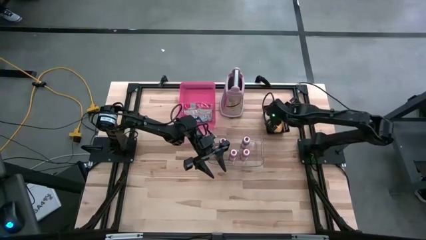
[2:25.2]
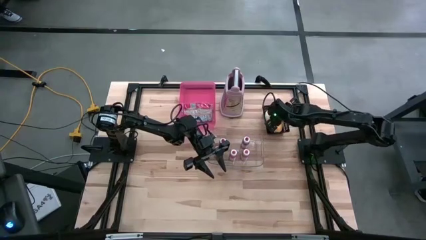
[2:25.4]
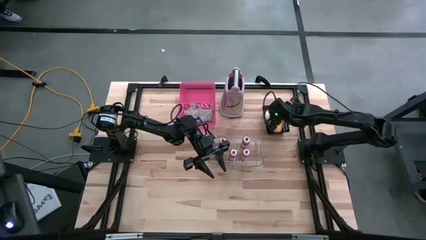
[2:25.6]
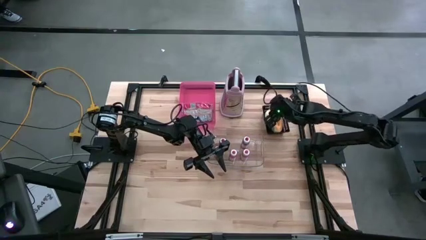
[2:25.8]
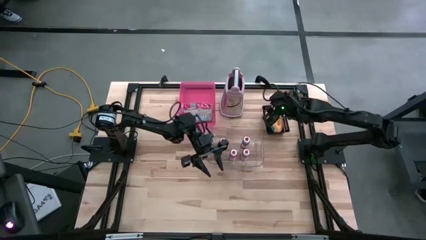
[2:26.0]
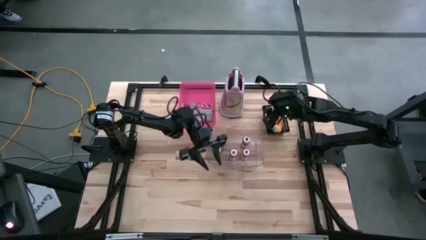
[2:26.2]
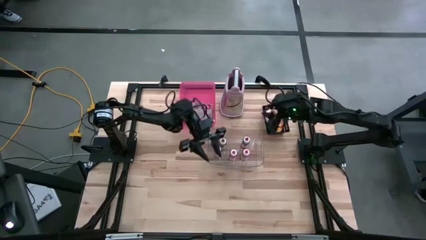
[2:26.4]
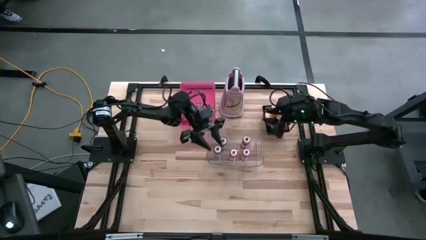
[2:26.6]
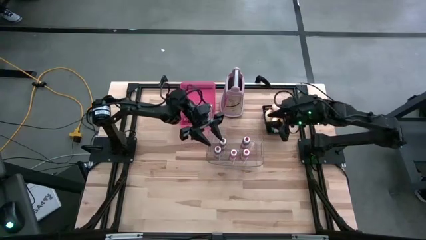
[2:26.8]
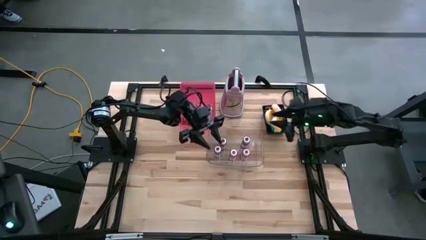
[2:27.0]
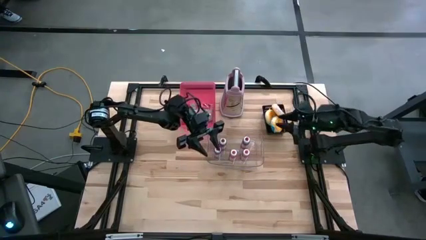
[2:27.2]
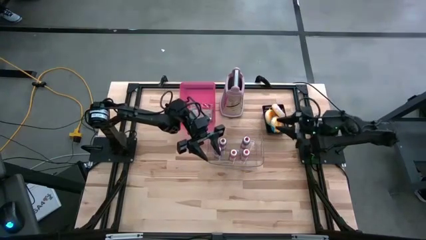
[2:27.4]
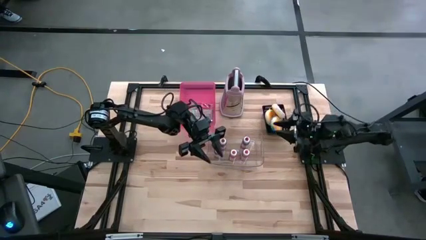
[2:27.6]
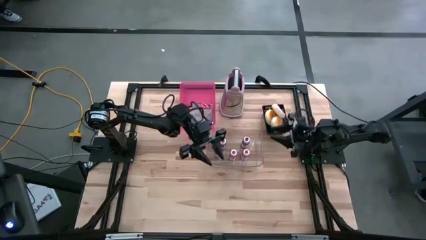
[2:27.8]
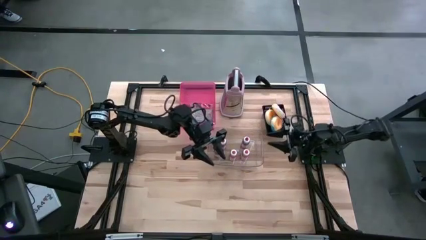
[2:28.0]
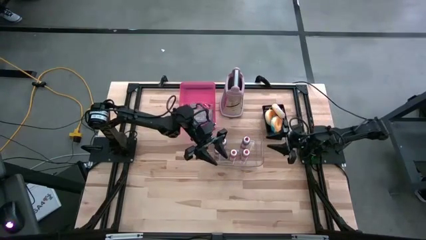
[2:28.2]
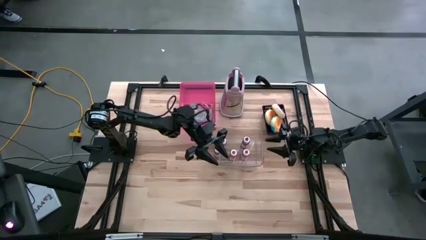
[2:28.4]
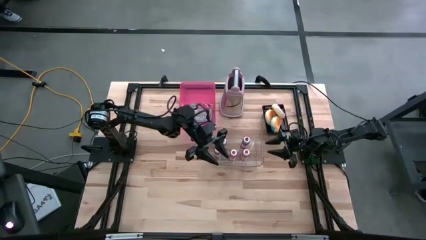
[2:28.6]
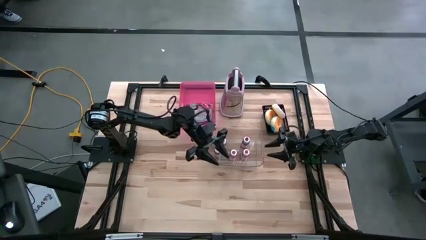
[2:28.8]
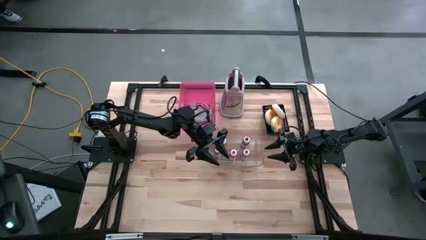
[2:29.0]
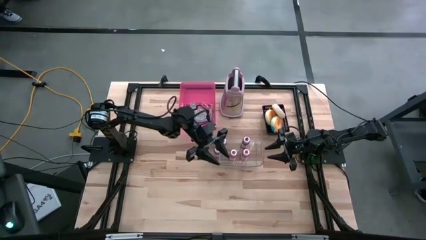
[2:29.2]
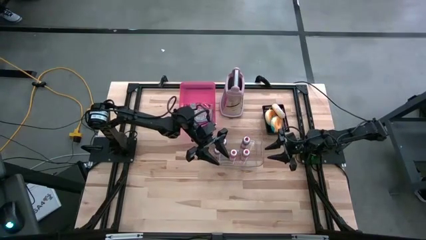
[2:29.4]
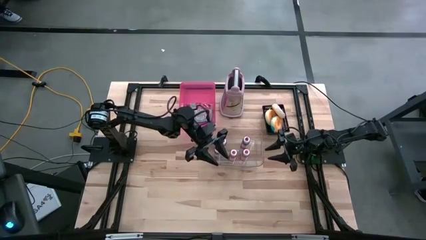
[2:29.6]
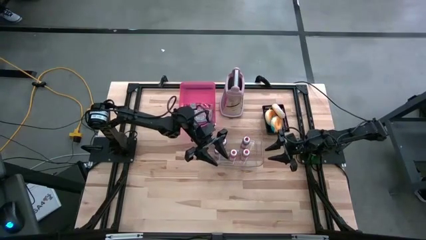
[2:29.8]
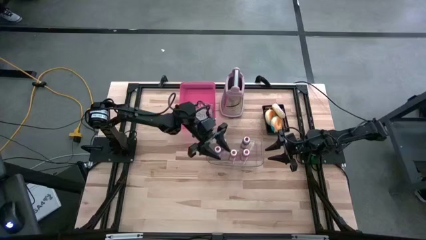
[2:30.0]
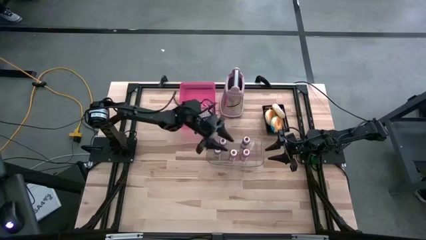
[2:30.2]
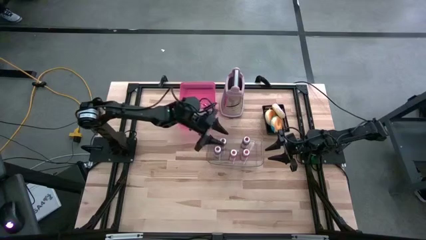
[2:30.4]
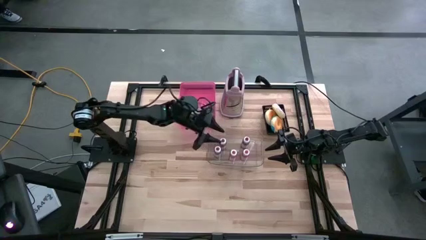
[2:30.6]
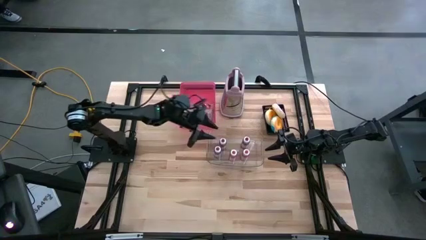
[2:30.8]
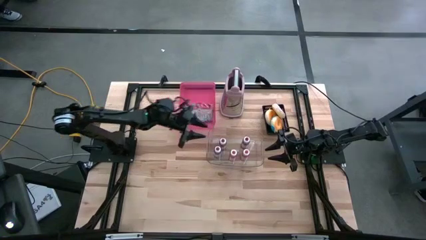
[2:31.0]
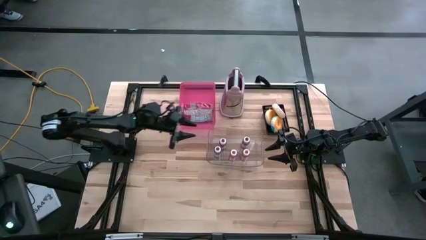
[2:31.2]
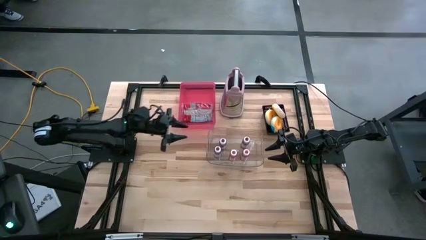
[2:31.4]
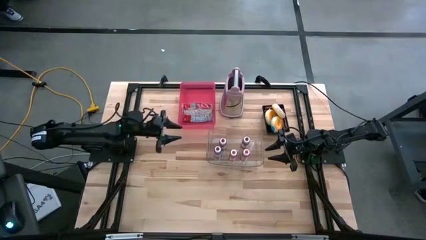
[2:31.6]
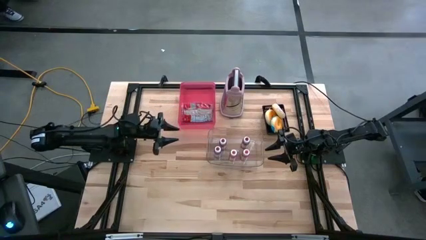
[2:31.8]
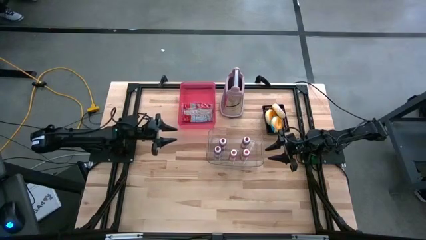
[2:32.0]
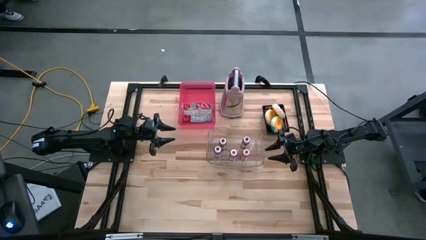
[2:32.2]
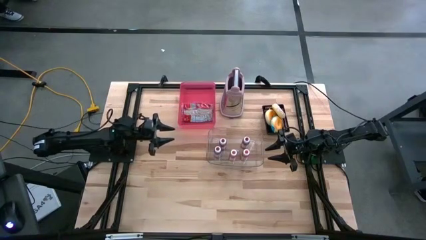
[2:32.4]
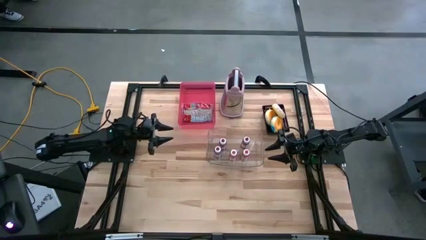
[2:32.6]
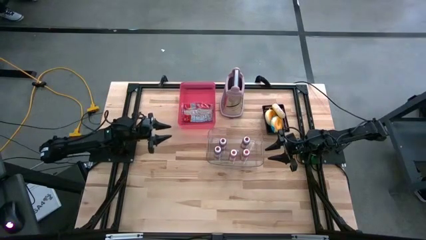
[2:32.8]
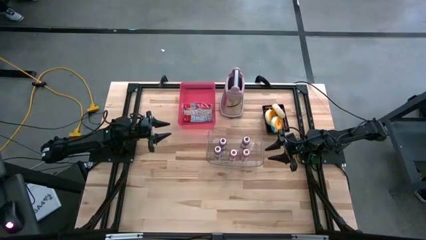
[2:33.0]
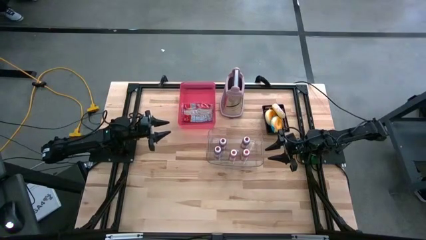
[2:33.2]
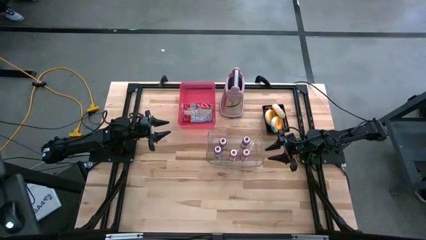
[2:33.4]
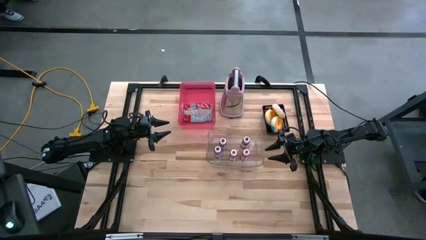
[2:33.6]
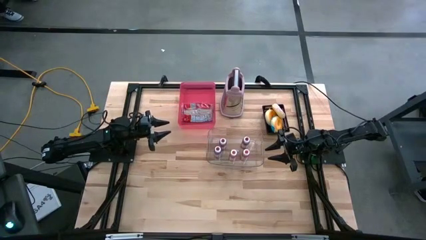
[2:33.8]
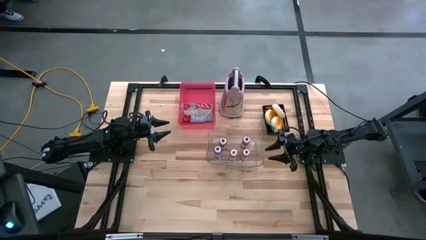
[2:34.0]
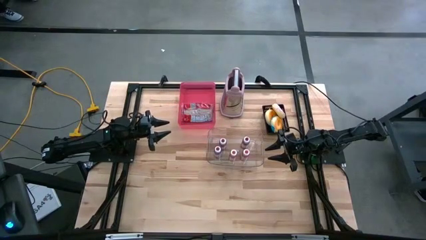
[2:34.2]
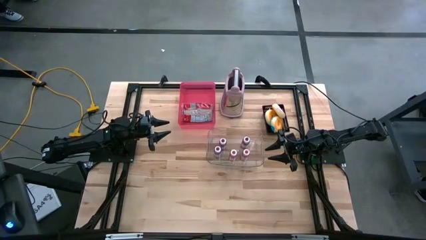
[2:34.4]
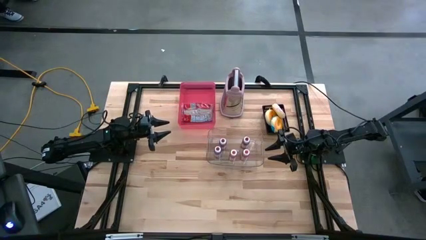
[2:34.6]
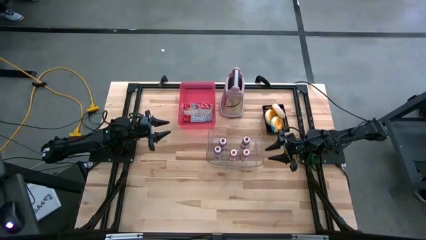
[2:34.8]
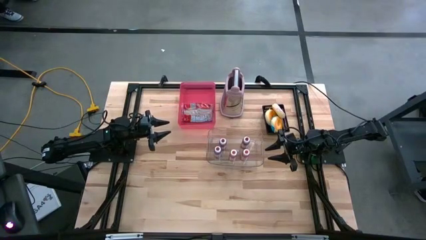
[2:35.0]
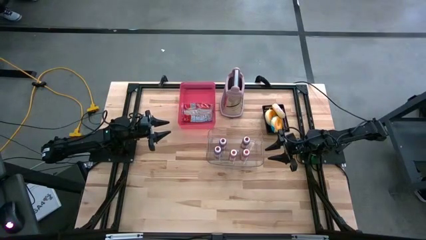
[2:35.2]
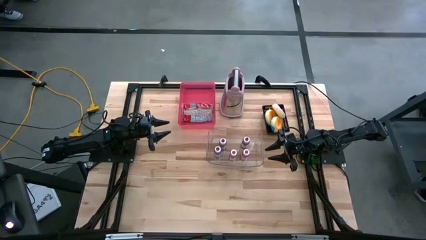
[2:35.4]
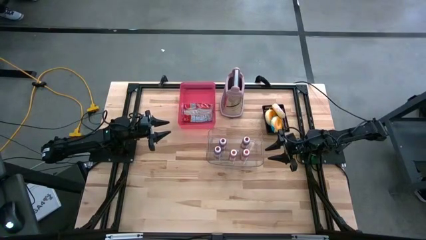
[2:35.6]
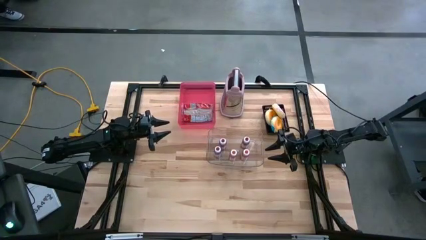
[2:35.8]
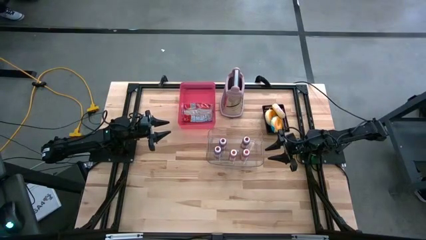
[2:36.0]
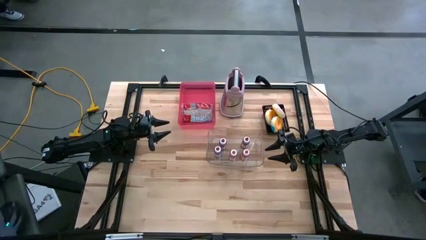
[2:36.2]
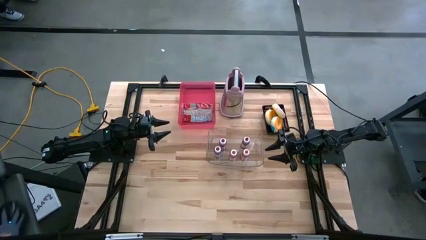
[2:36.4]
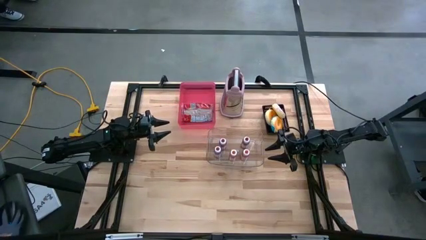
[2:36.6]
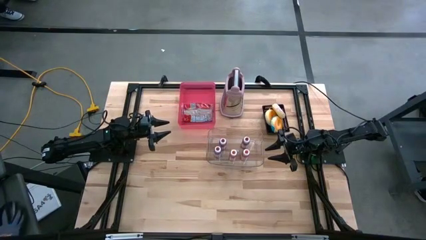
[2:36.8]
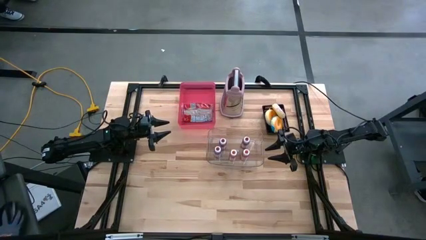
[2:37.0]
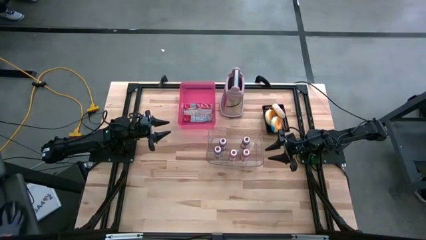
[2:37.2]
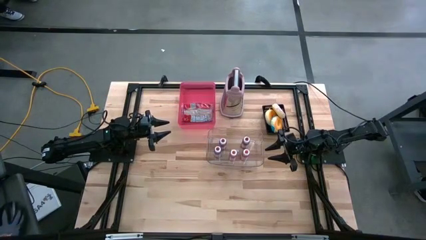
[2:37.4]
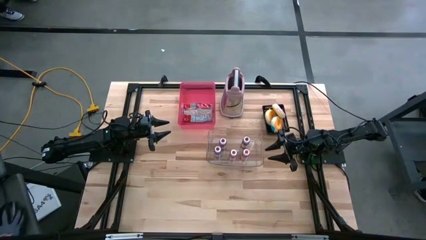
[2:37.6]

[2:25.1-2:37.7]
Return to Home Position
